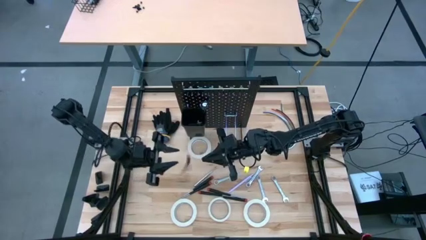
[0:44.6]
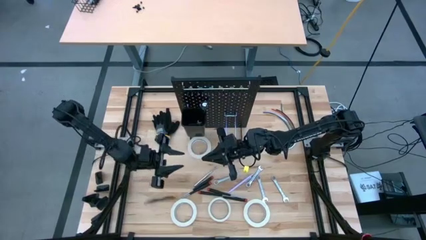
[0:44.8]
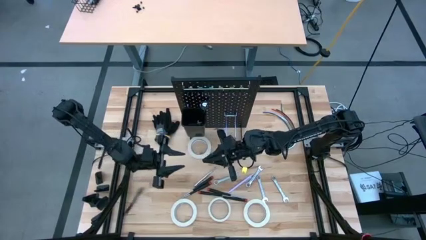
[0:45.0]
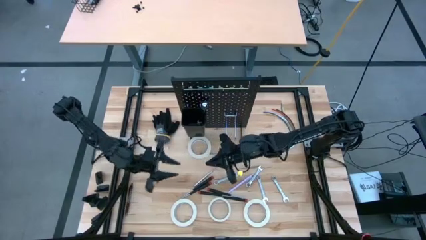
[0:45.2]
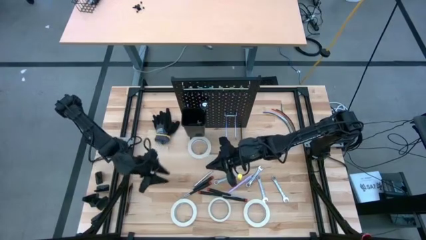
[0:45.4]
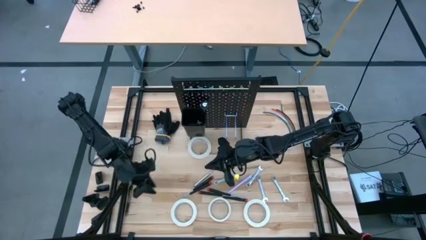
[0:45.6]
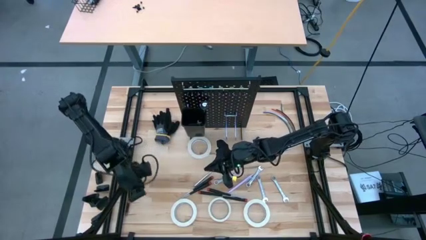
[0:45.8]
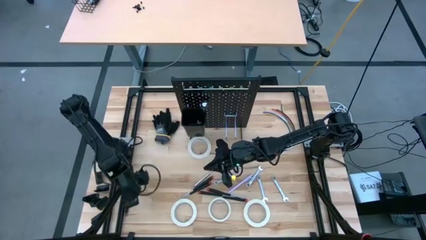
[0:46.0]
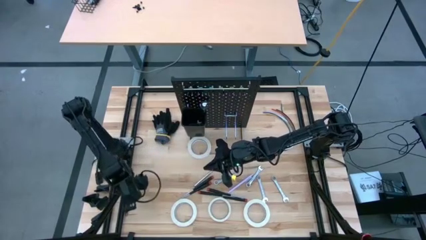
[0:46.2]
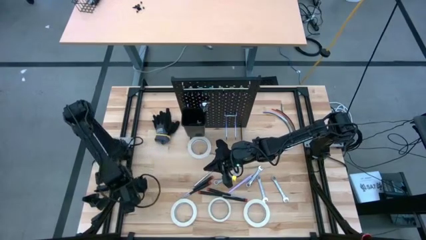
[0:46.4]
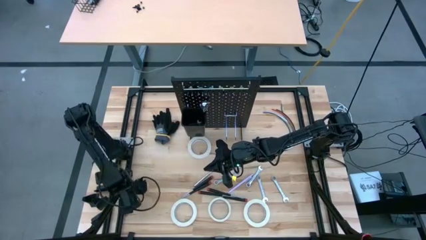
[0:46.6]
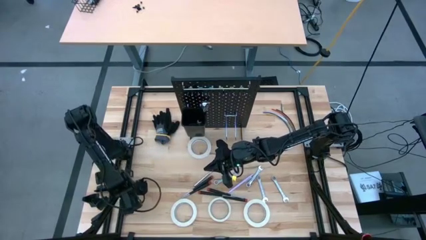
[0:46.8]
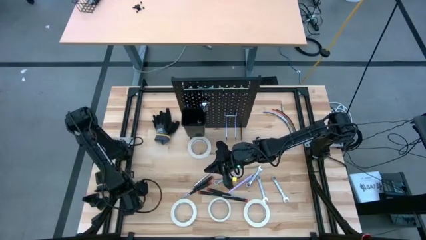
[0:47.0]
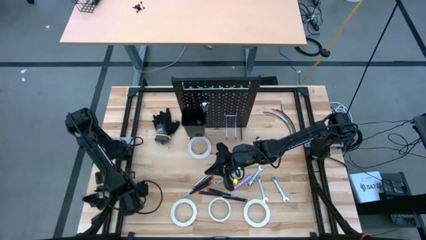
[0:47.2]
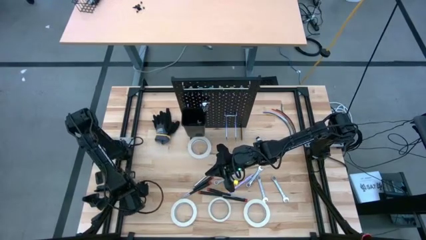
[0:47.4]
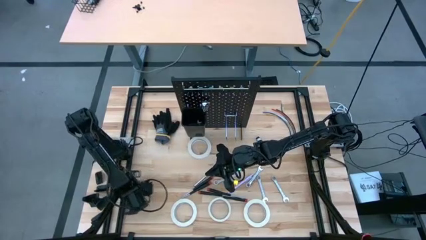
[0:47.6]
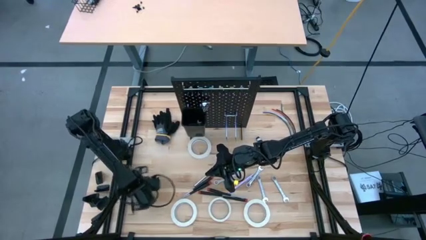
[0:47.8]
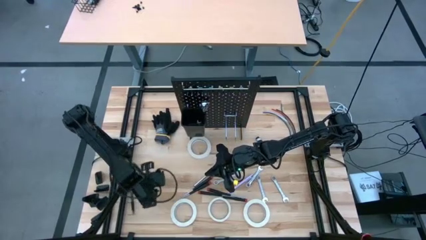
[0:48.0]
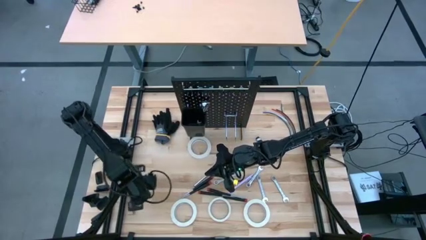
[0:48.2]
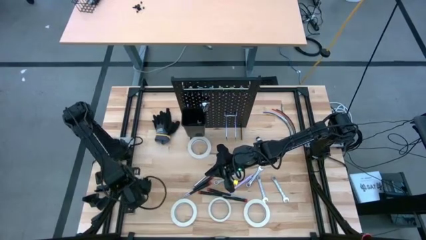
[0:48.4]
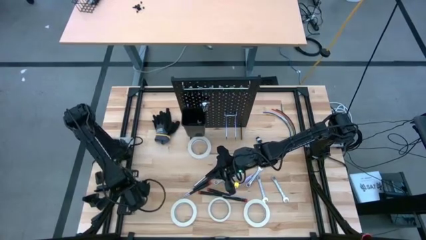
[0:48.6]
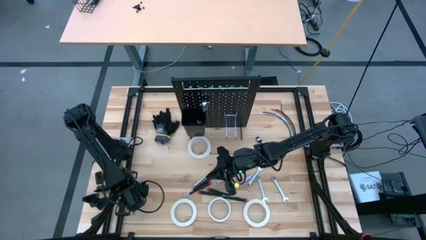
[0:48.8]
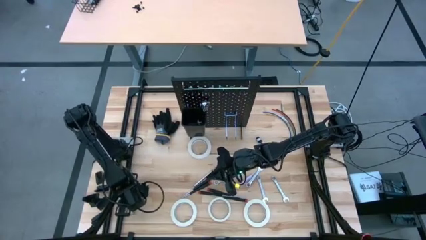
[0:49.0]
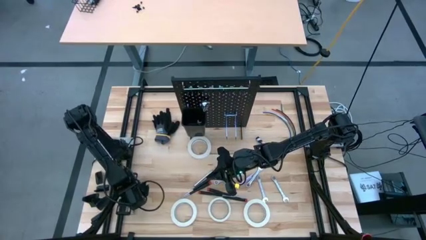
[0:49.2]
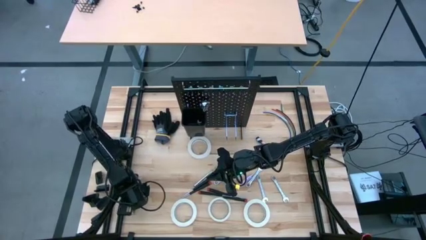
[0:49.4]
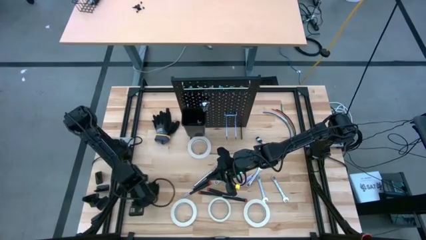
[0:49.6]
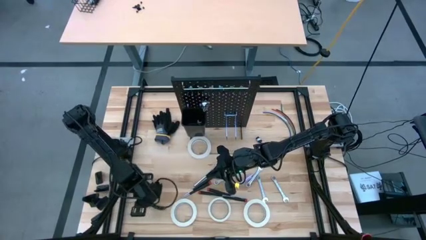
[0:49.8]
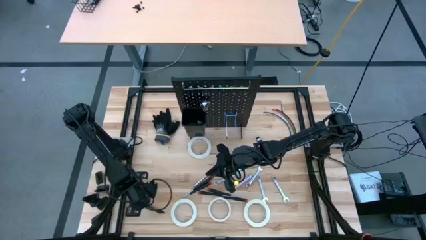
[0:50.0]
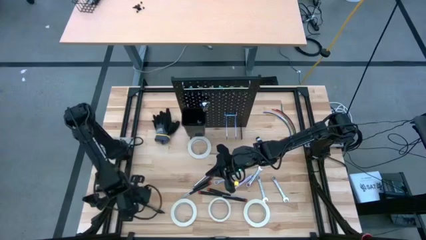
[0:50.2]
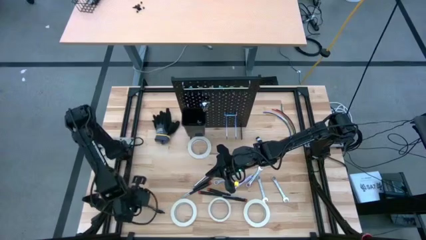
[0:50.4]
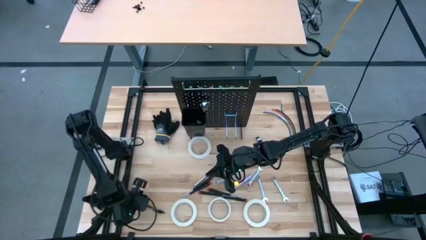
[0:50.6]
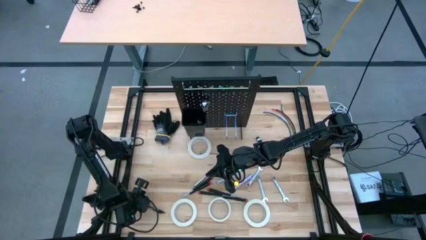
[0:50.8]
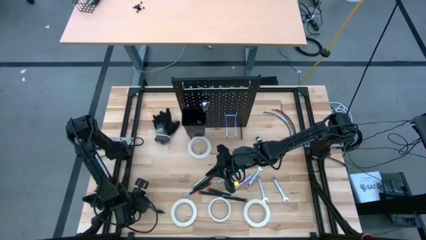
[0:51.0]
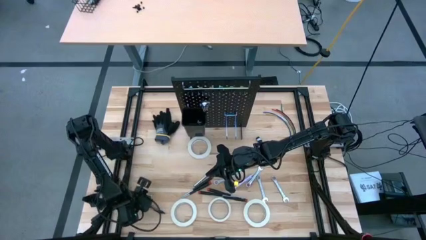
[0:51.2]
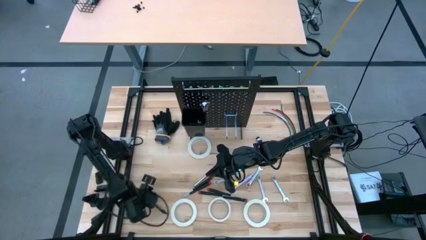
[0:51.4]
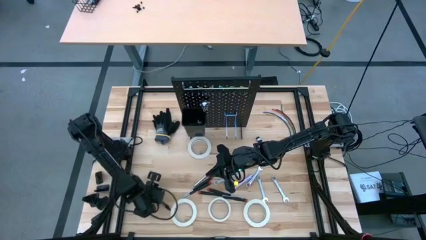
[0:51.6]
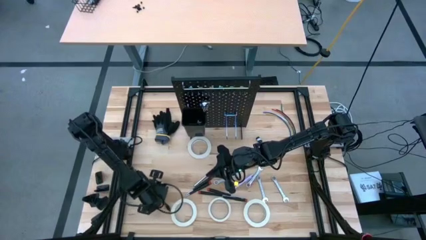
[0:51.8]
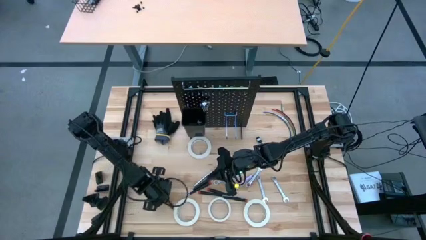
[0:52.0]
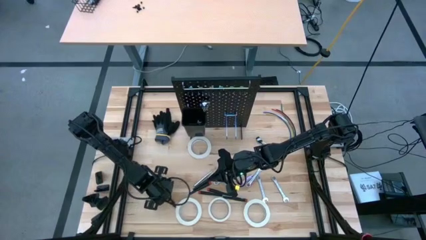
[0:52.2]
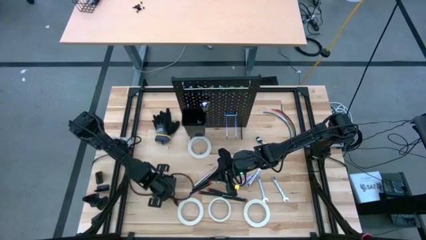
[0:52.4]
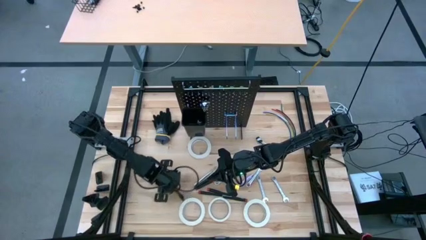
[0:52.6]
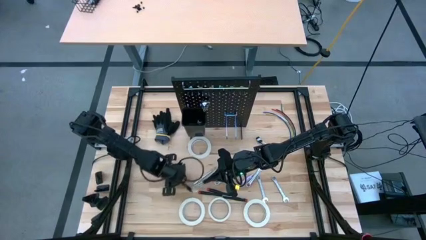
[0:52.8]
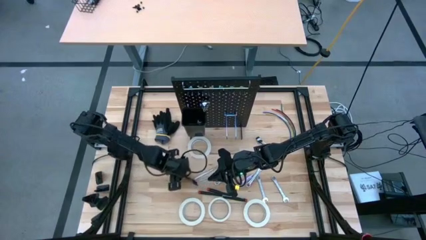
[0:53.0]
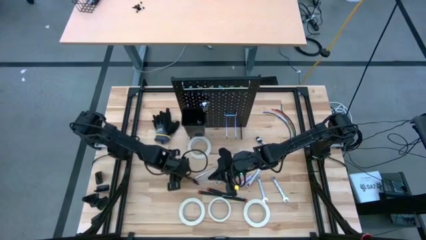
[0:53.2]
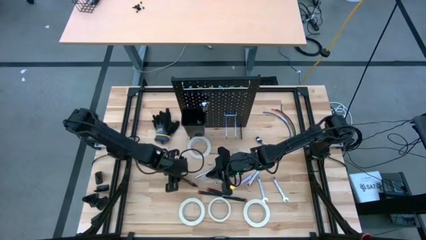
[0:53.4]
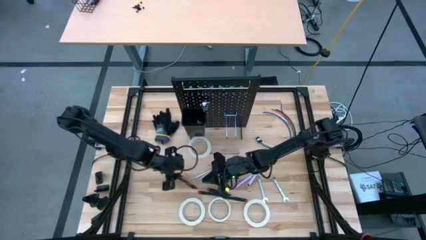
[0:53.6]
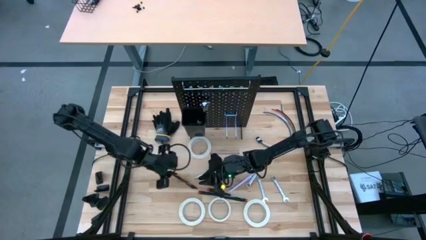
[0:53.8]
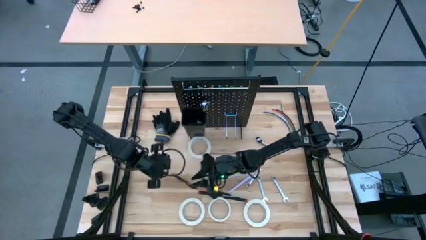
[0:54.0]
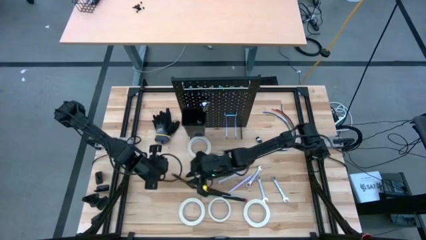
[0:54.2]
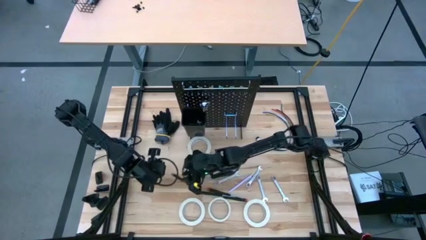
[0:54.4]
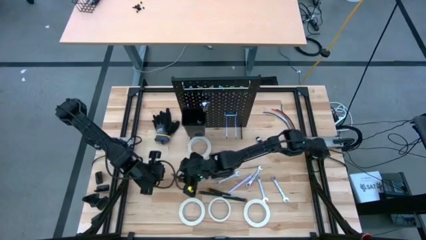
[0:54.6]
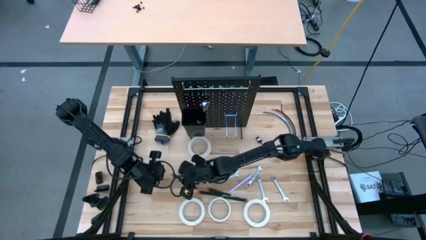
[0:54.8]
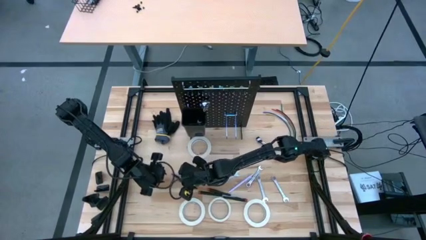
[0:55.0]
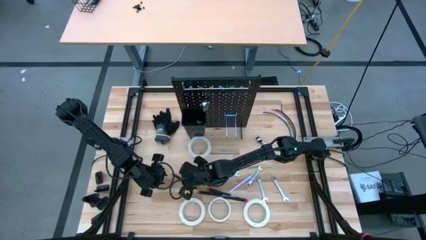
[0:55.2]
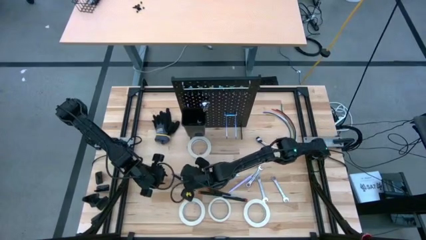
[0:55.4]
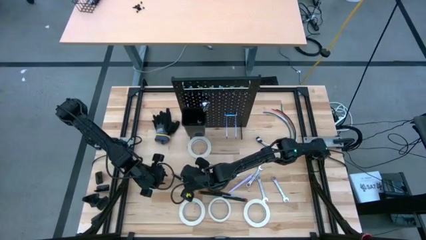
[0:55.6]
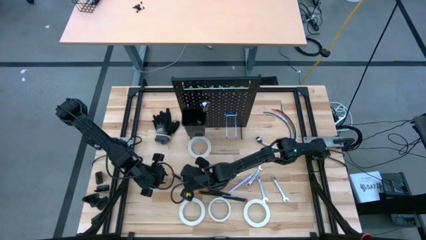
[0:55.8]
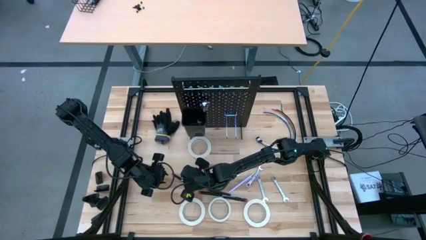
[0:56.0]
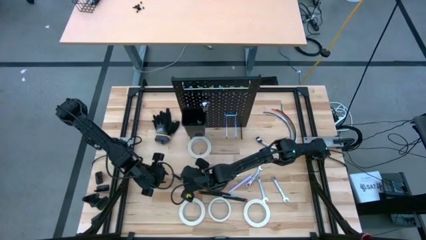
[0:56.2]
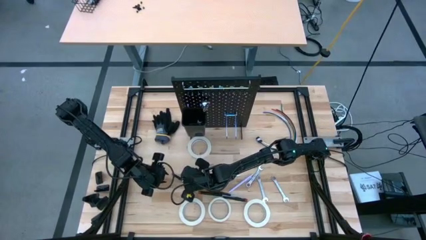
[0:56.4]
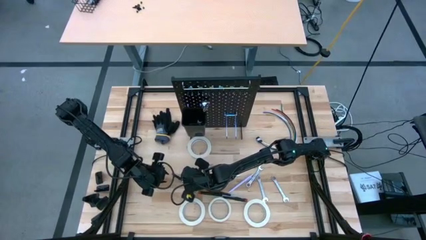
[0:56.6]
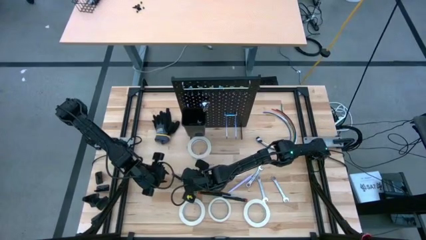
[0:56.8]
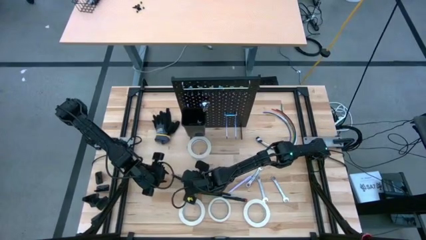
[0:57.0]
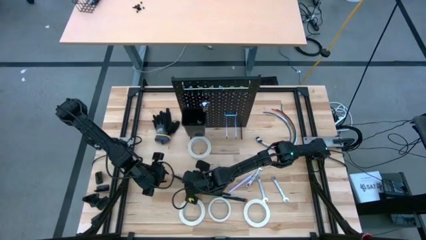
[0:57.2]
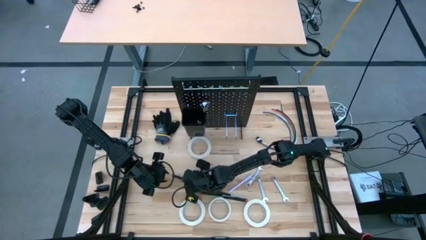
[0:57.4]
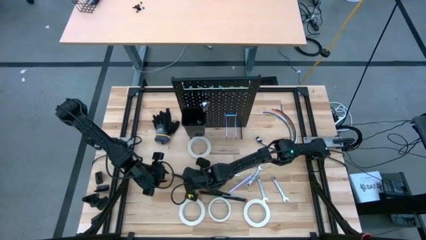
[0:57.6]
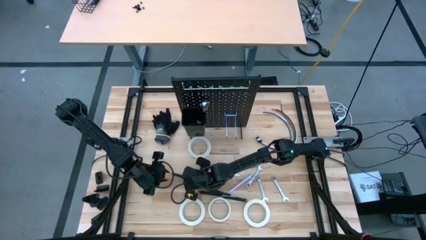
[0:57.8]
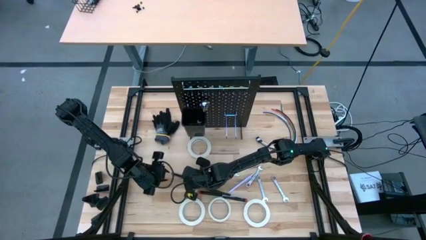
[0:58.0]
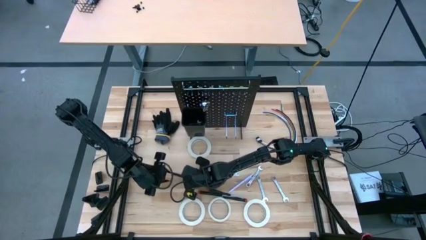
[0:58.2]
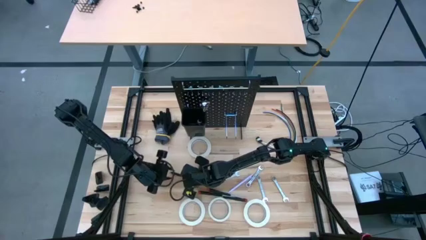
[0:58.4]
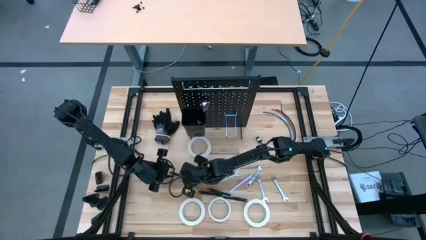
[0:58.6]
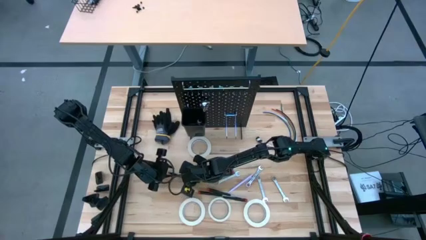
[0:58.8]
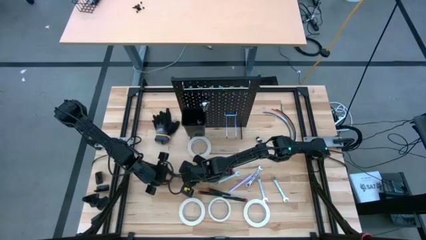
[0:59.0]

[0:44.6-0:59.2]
Task: Hang tools onto peg board
Put the black pen into the black bin on the peg board
